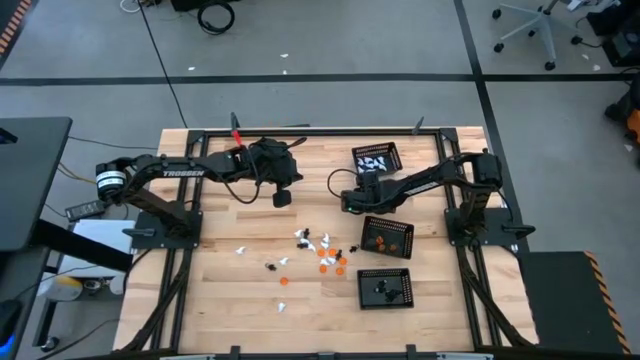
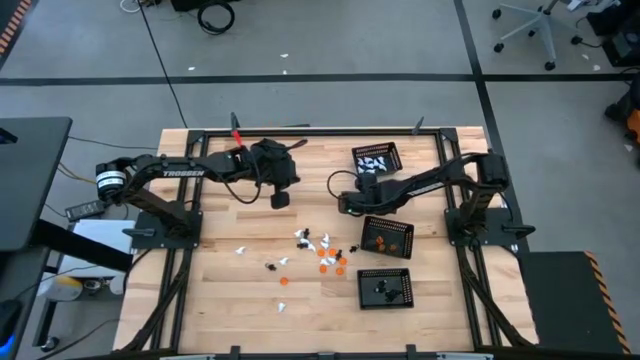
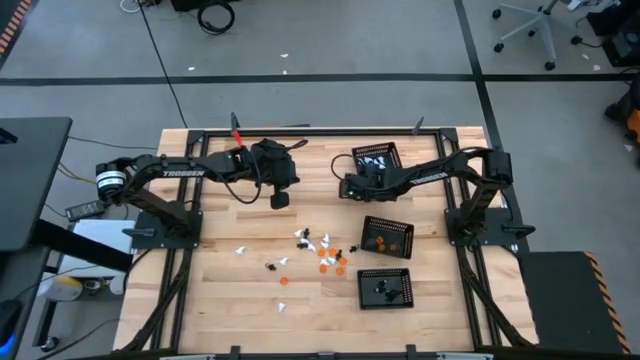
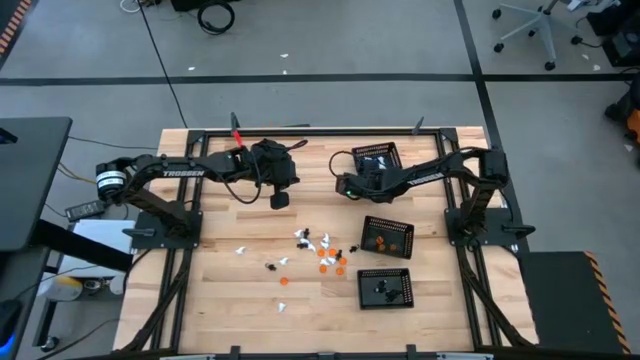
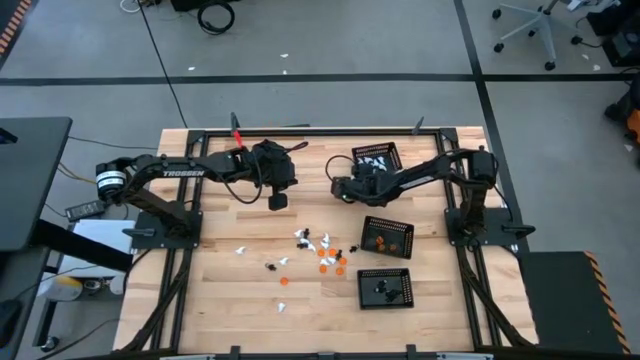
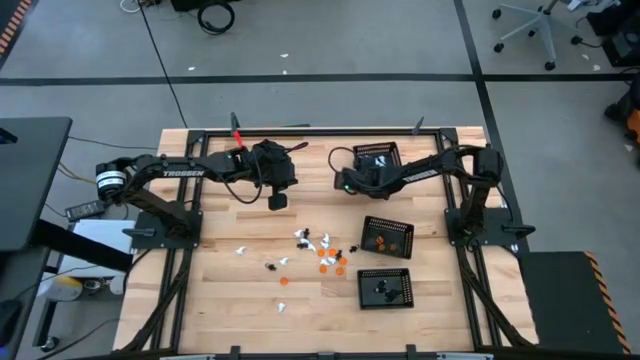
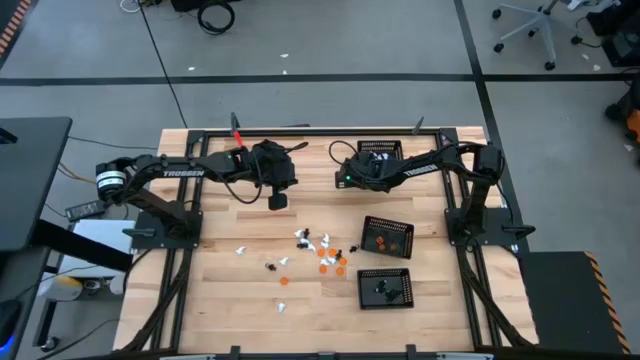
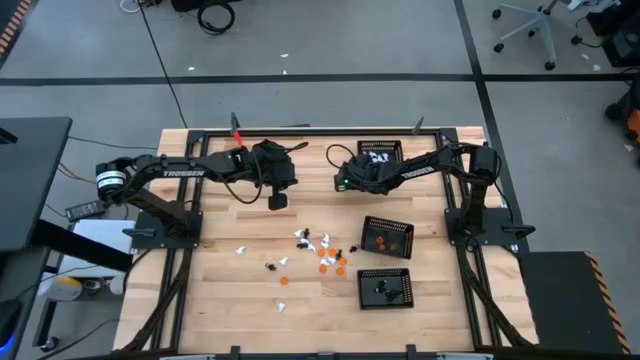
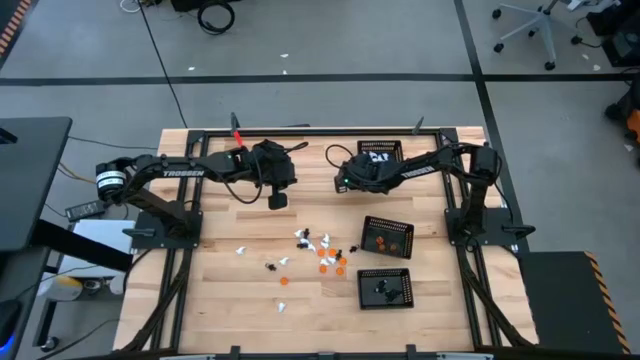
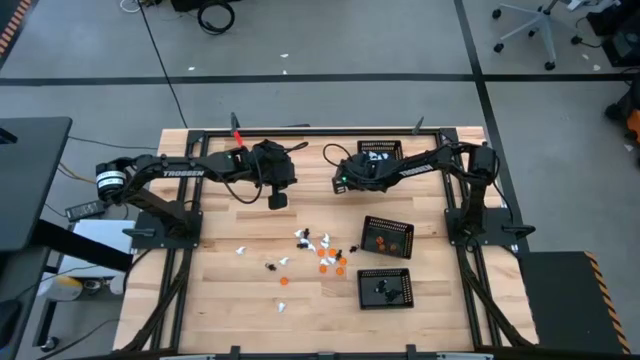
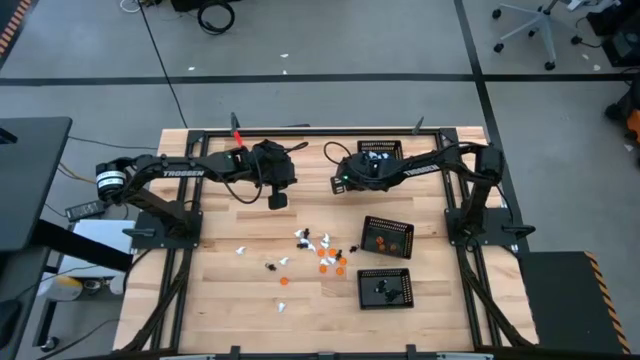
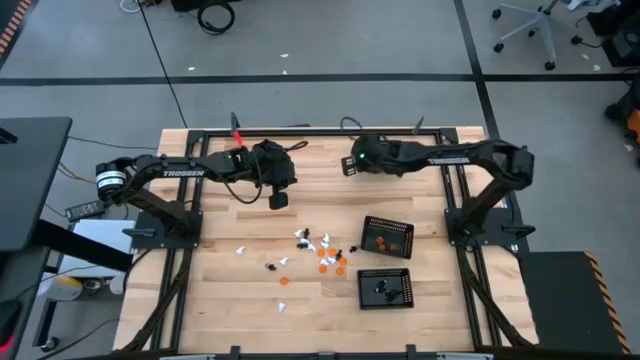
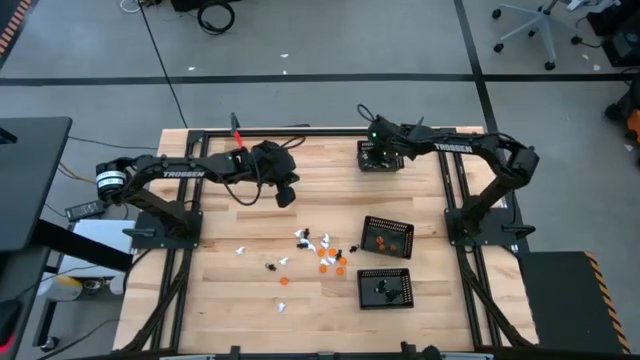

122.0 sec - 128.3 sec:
Task: Sort Halloween decoration
Put the white ghost toy into the top black bin

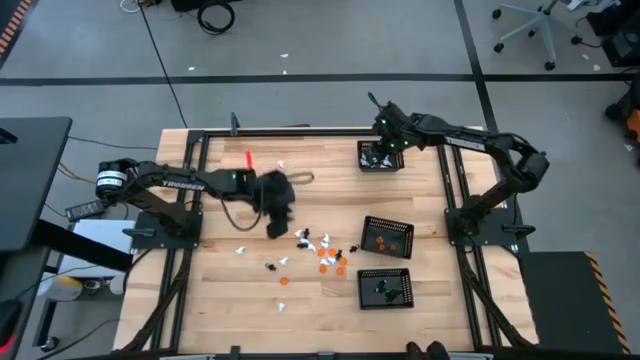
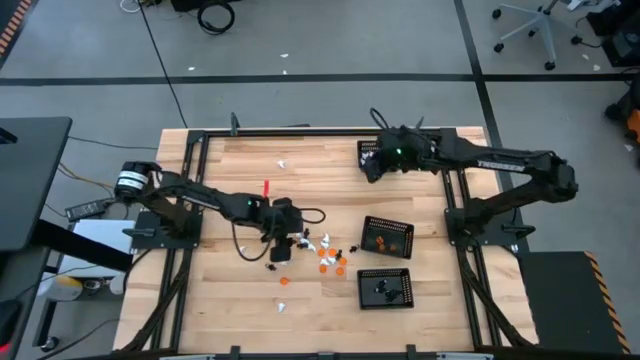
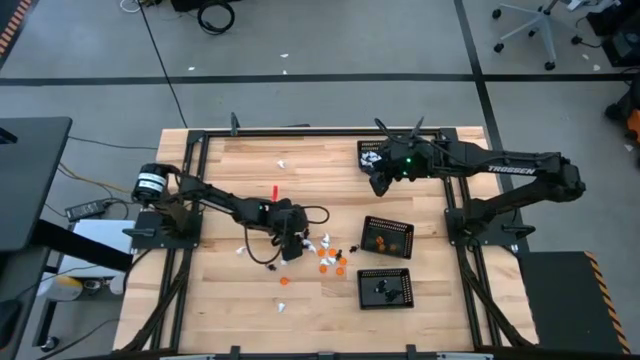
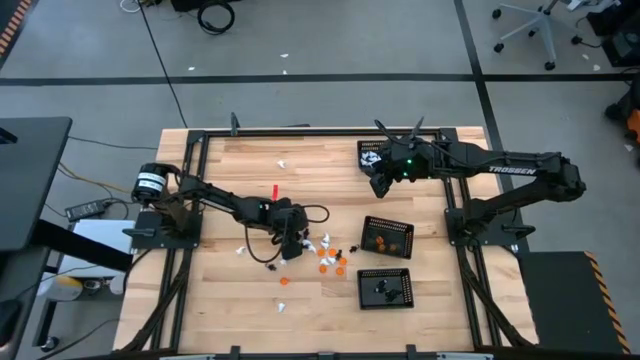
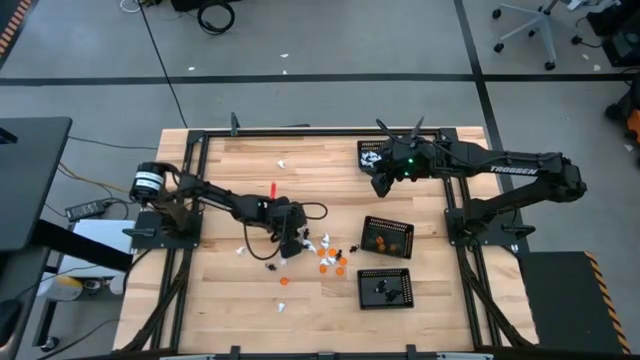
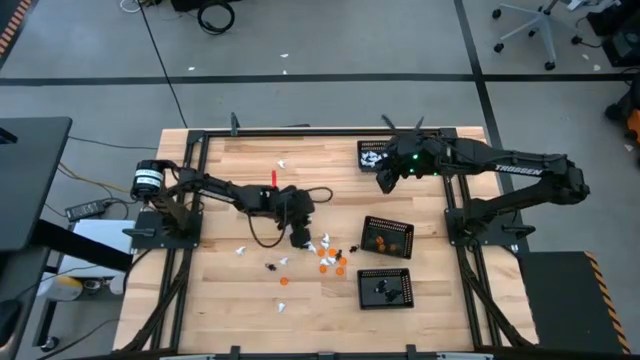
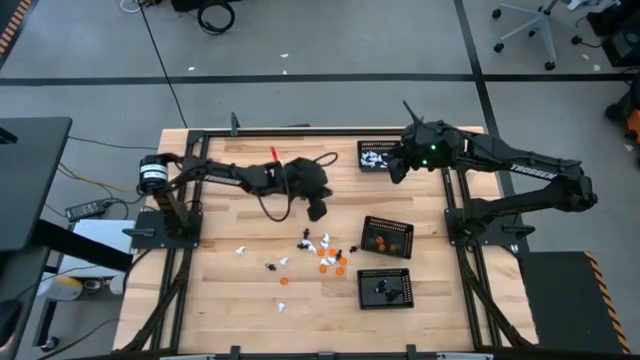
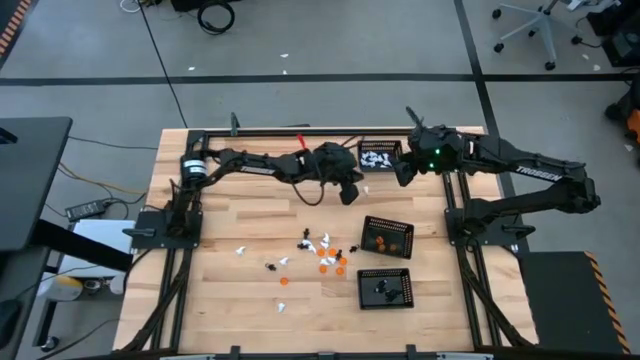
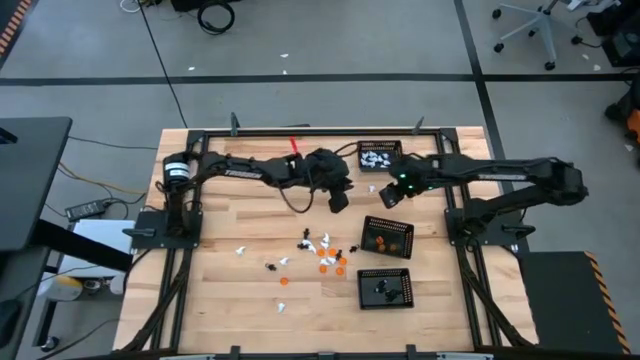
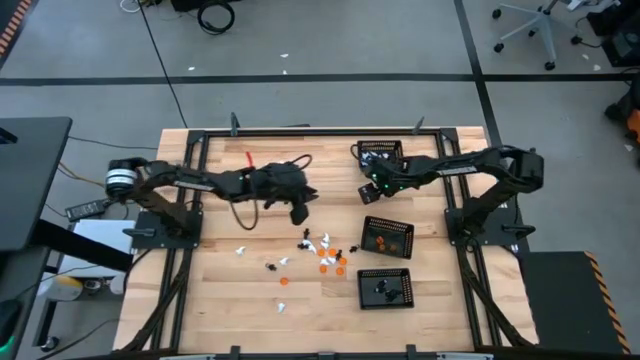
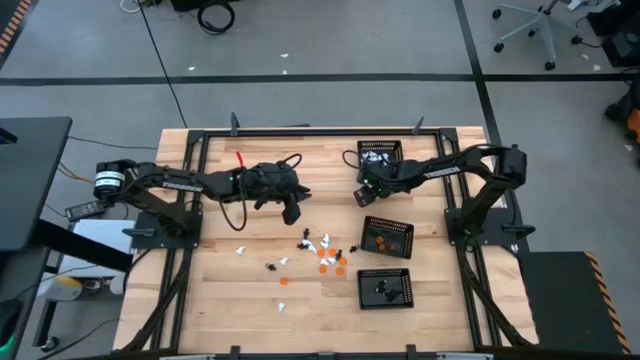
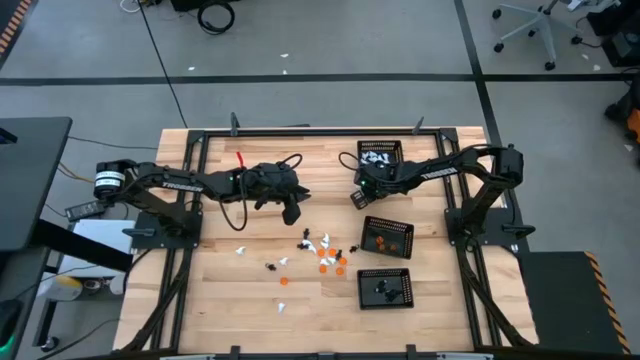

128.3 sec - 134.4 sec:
Put the white ghost toy into the top black bin

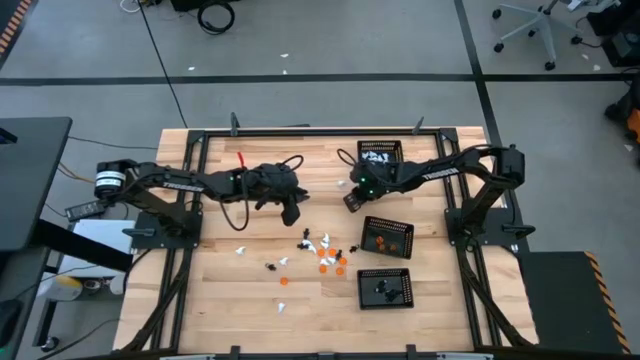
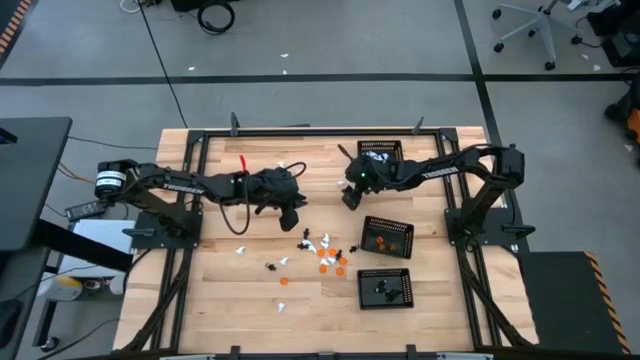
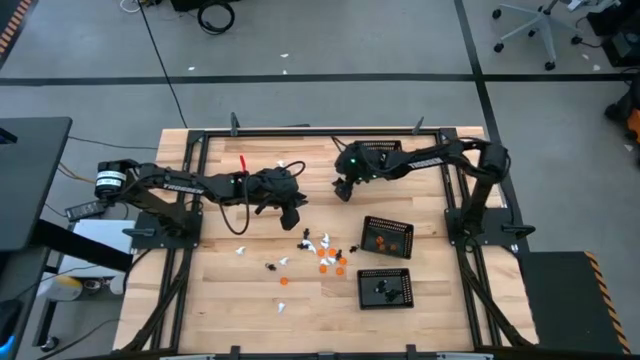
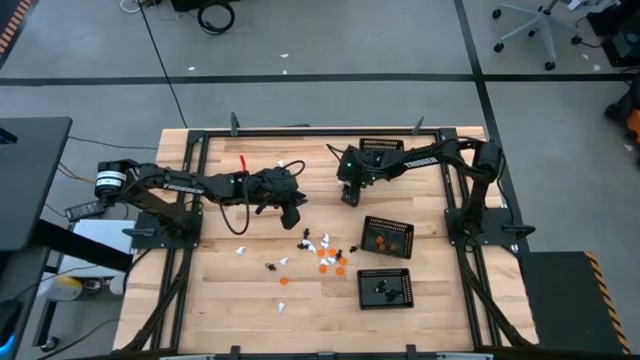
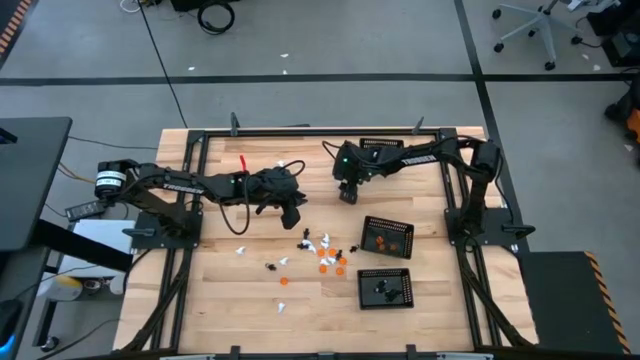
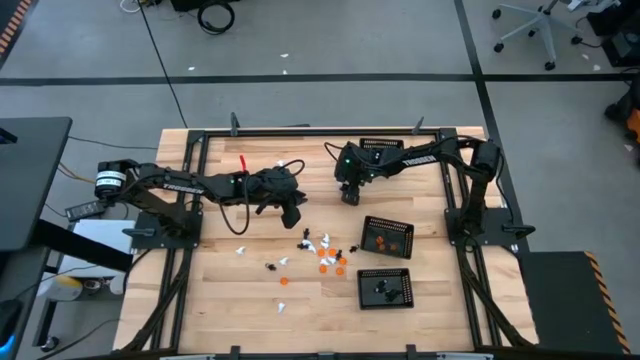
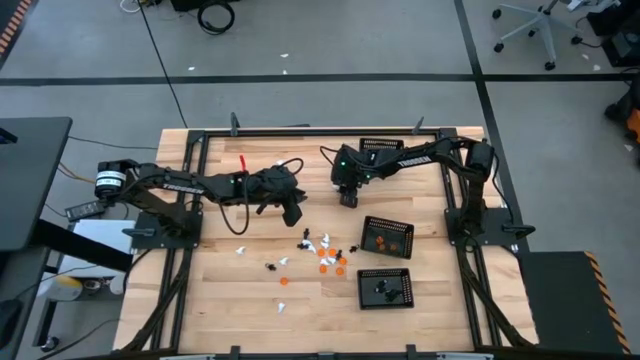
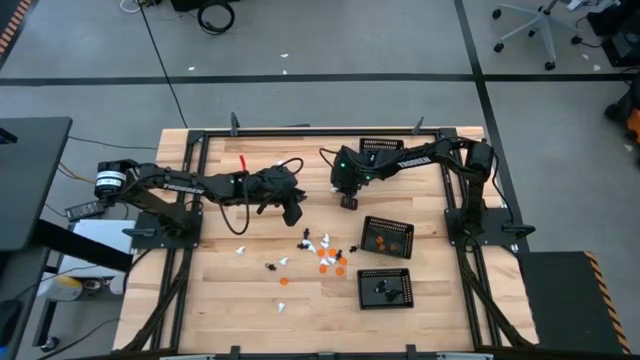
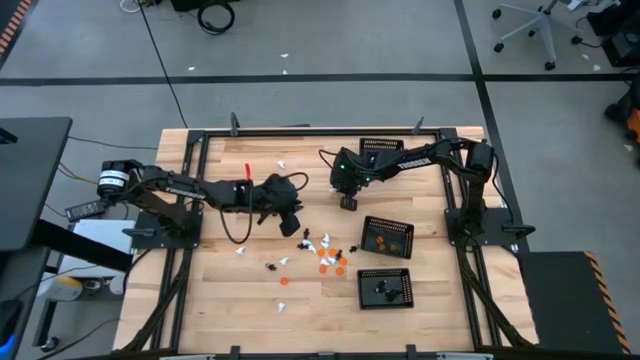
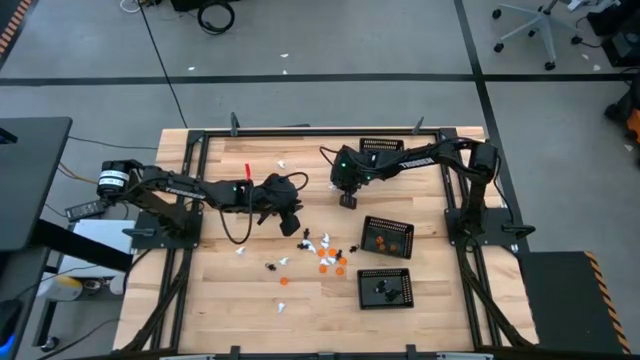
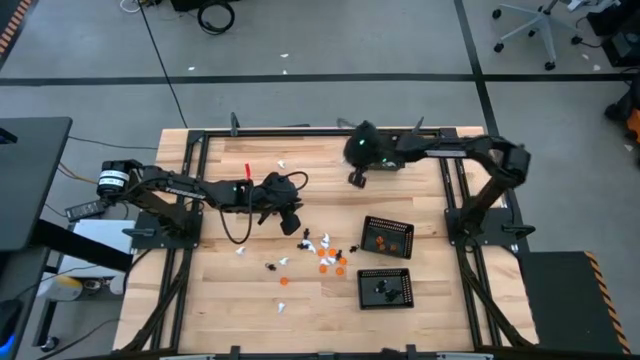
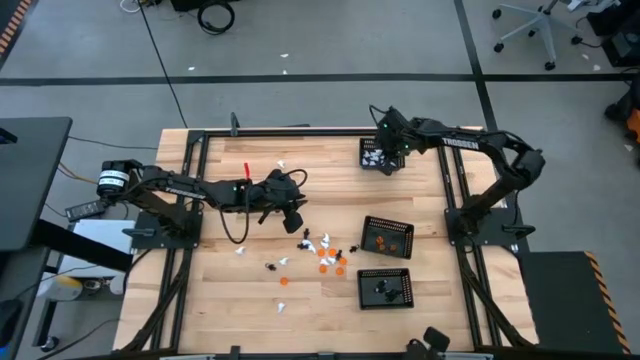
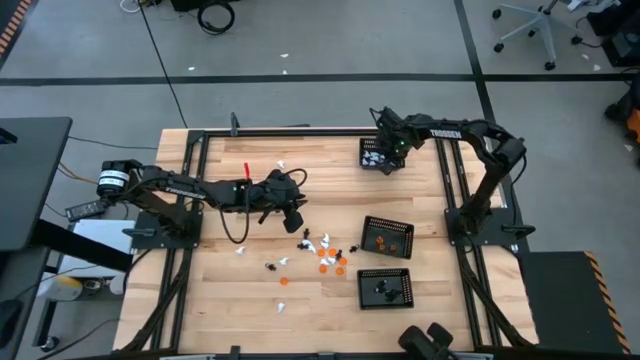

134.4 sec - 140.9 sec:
Put the white ghost toy into the top black bin

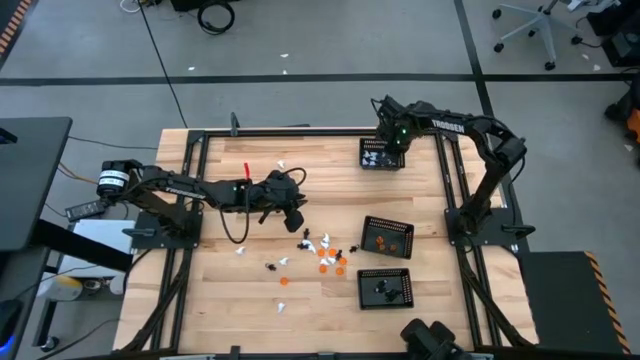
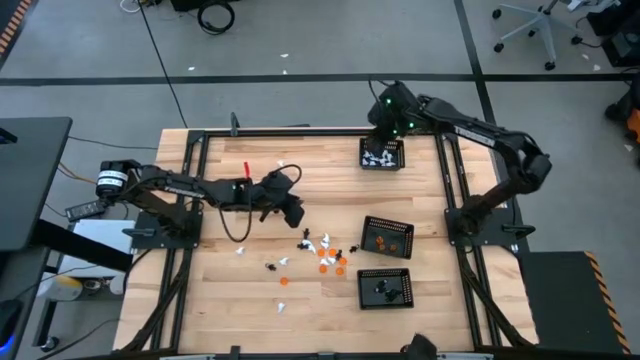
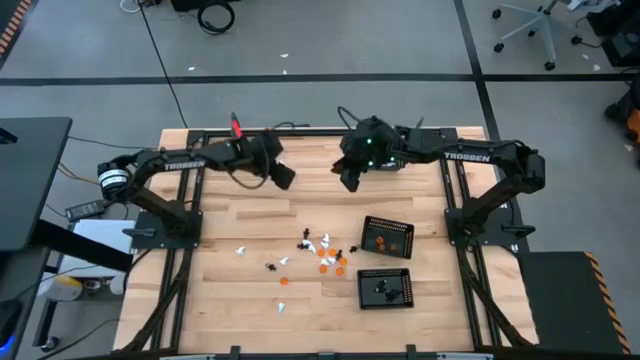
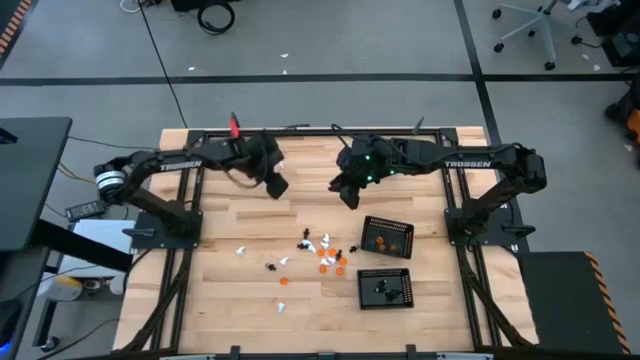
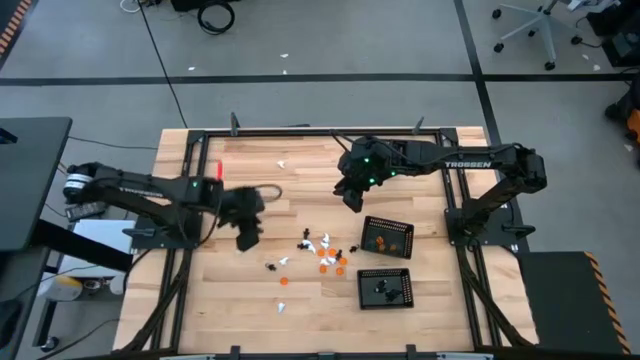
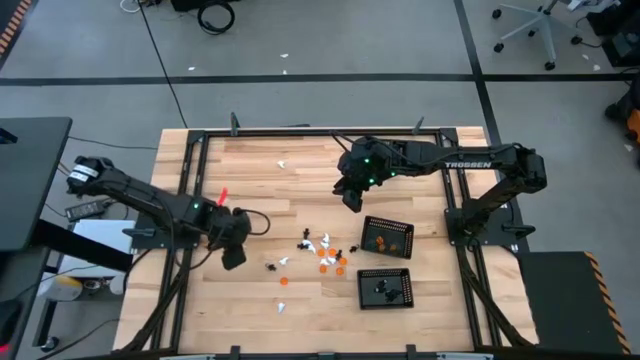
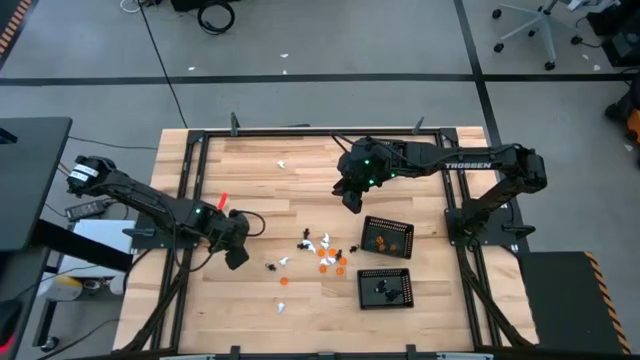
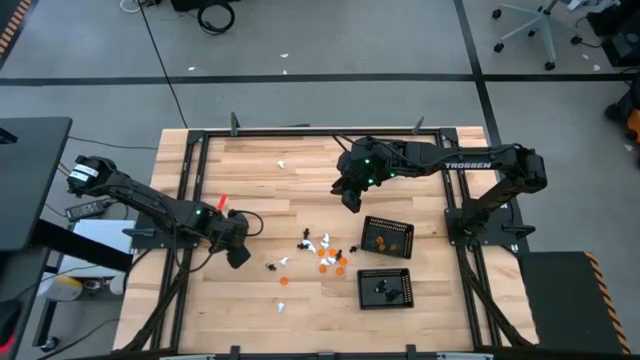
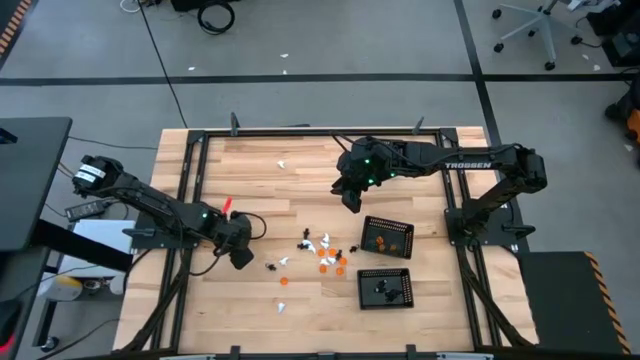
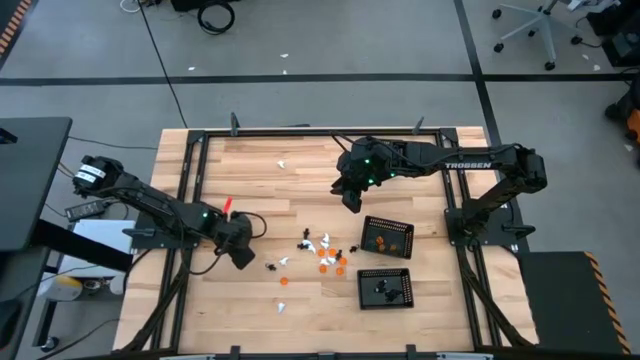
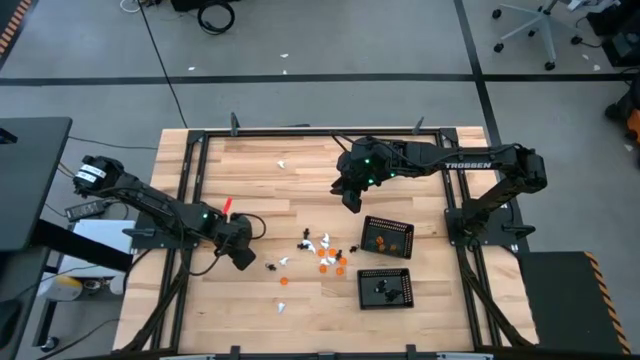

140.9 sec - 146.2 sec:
Put the white ghost toy into the top black bin
